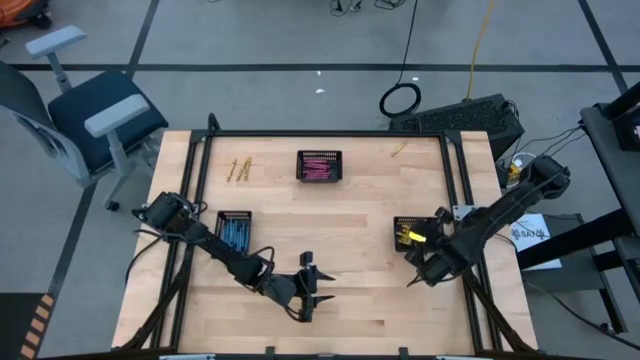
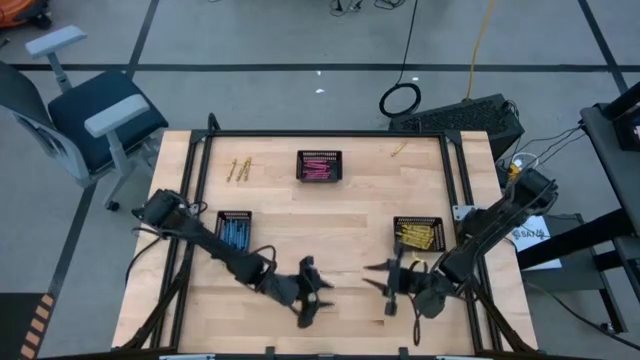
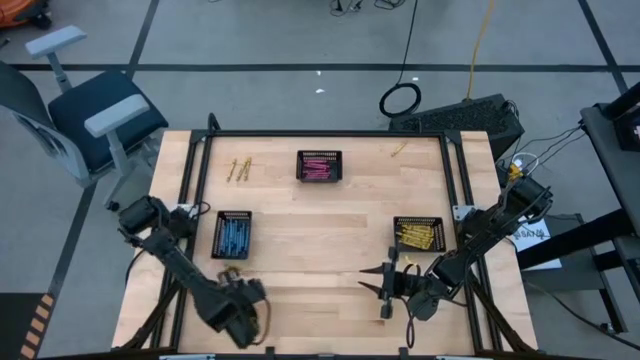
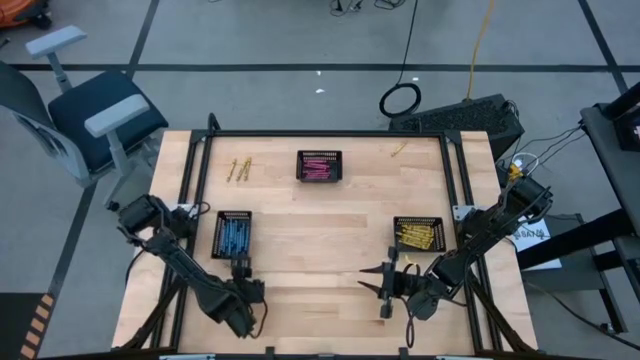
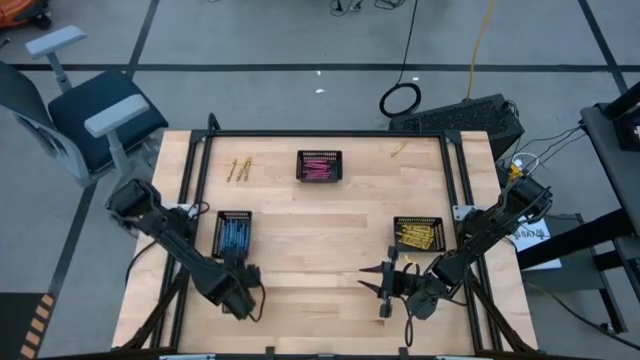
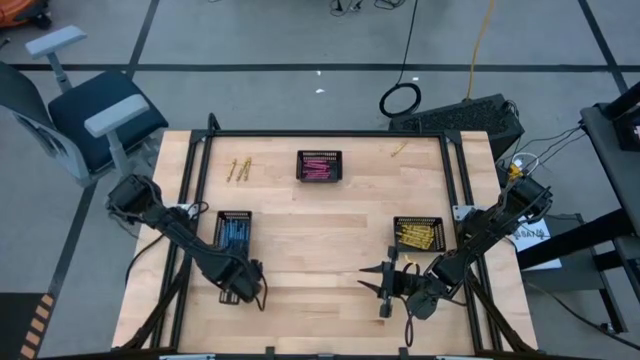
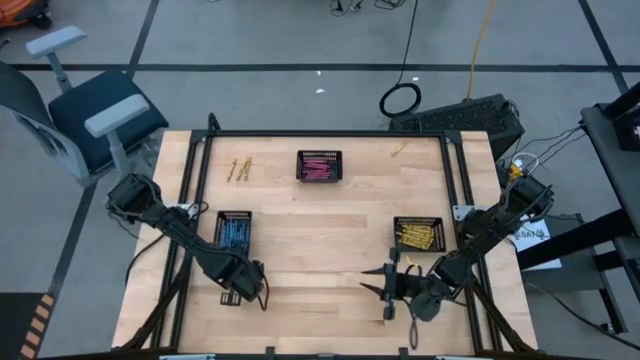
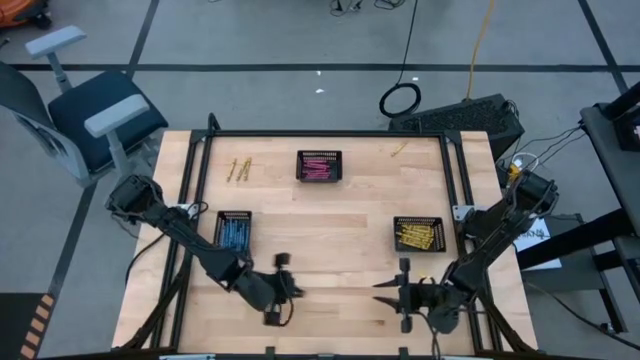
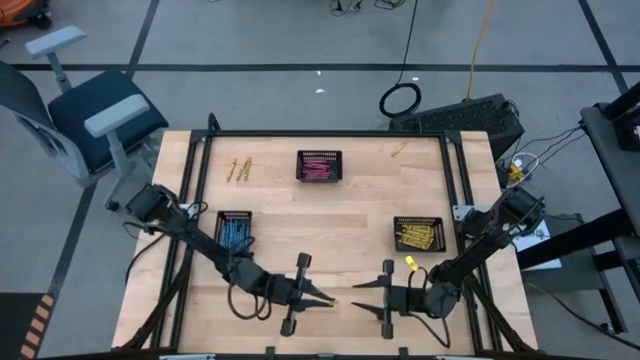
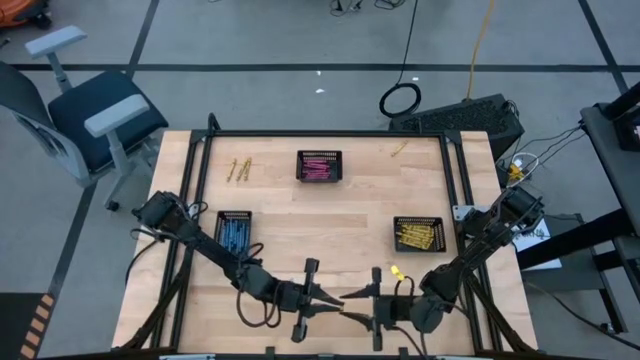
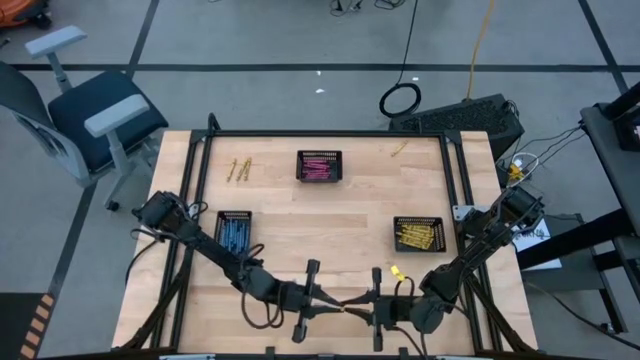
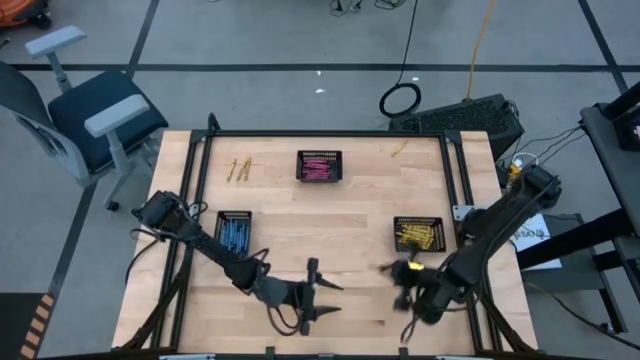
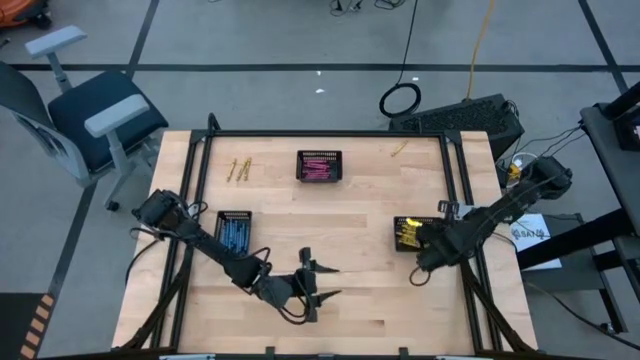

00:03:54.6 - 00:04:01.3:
Task: Sort crayons
Put the yellow crayon into the bottom right black bin

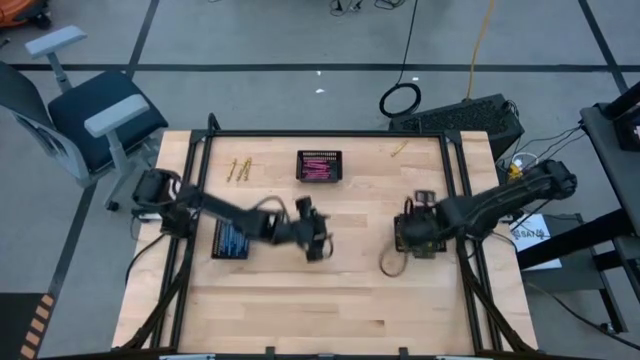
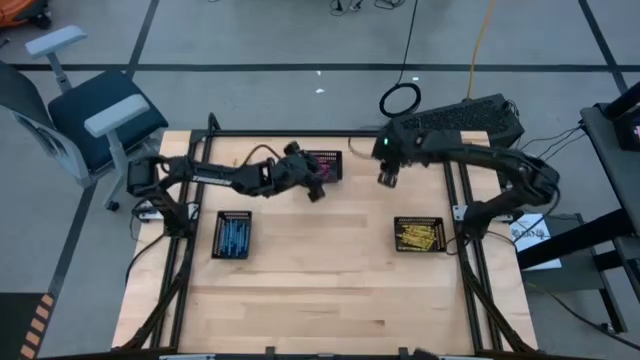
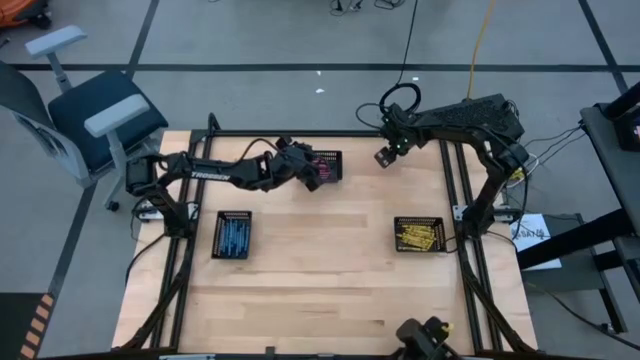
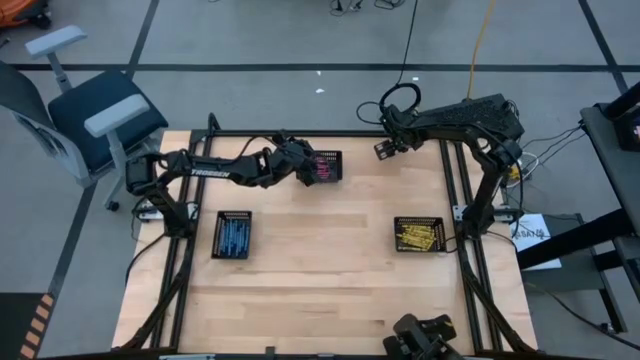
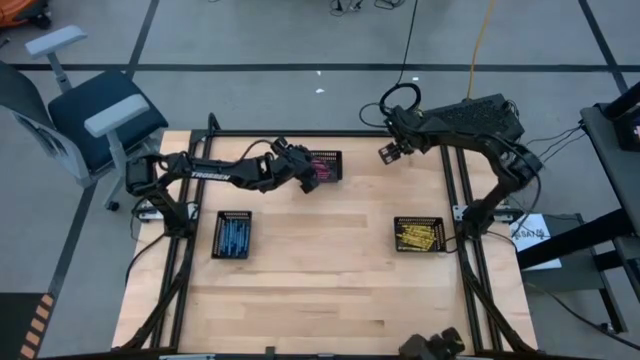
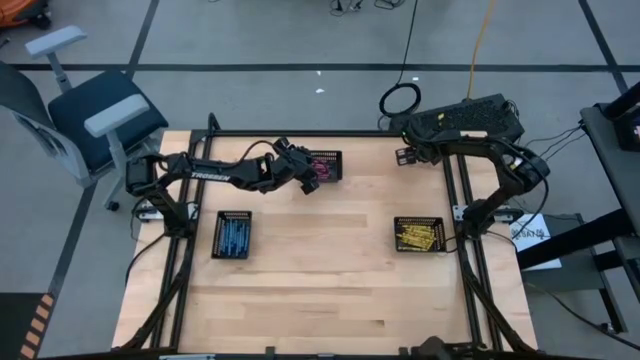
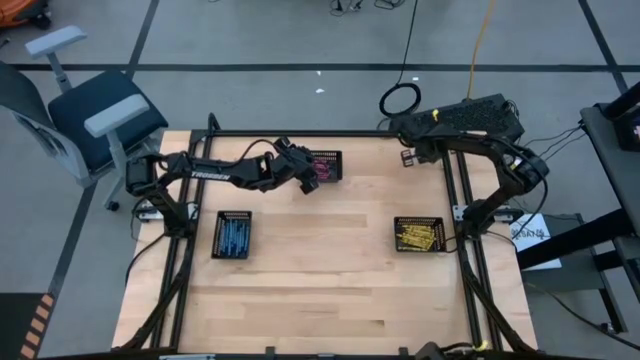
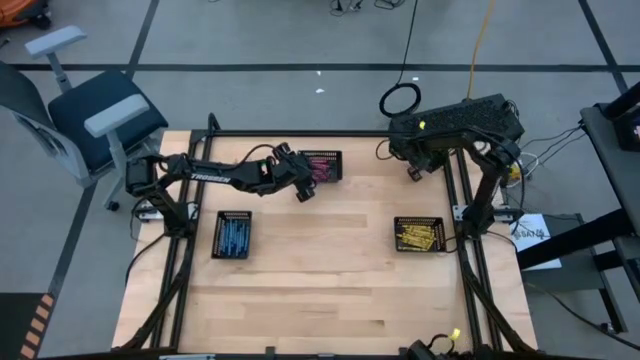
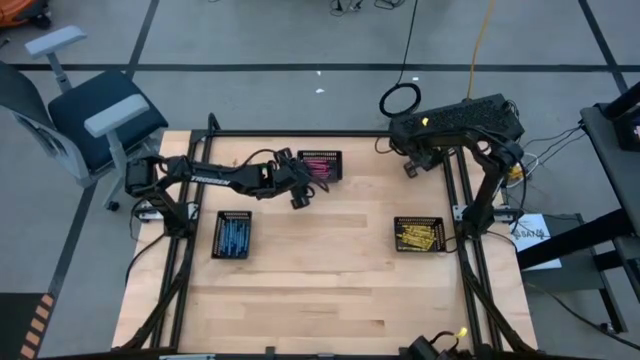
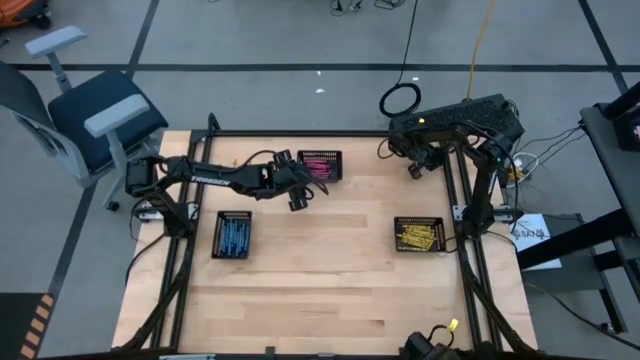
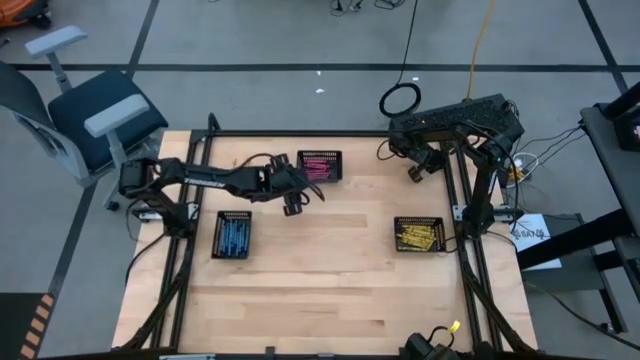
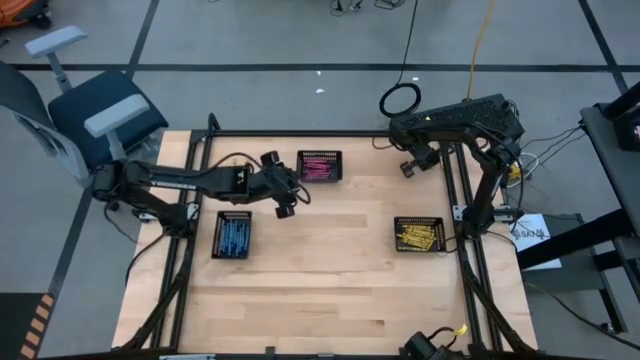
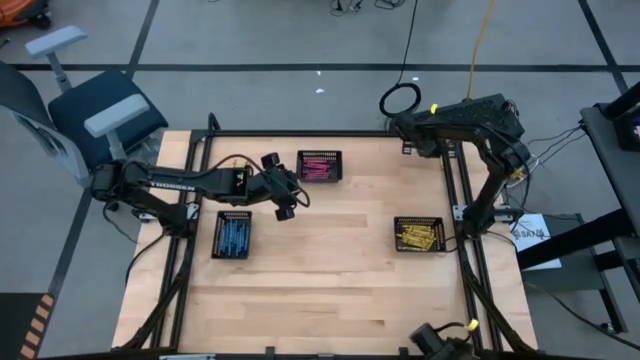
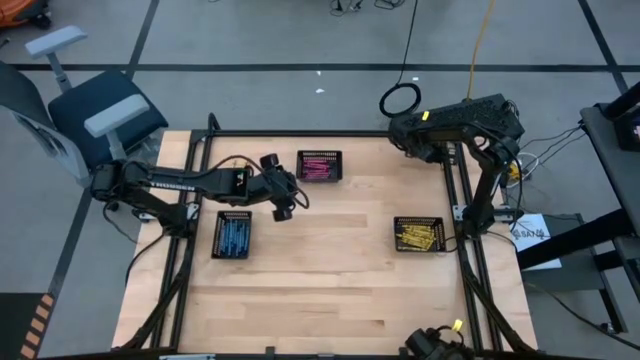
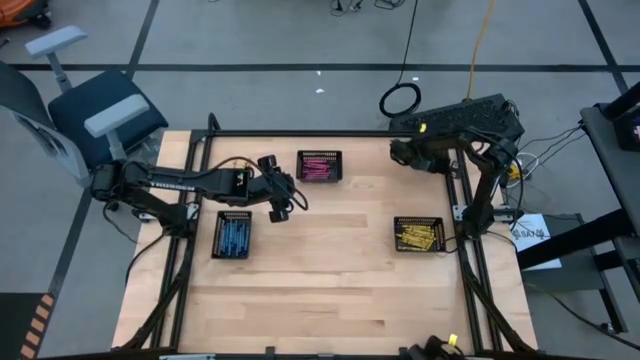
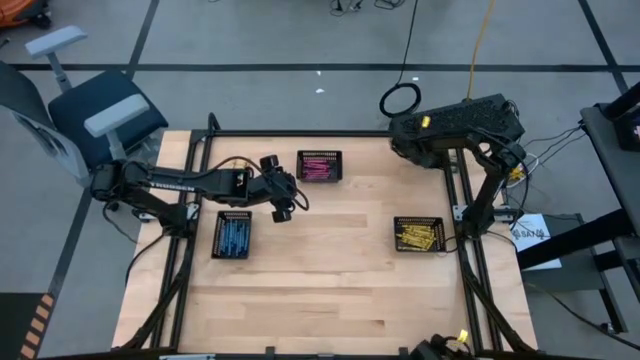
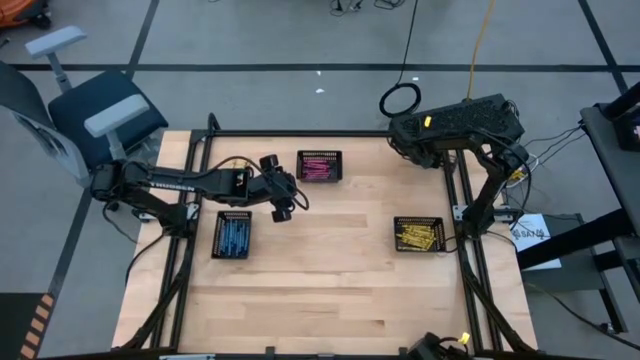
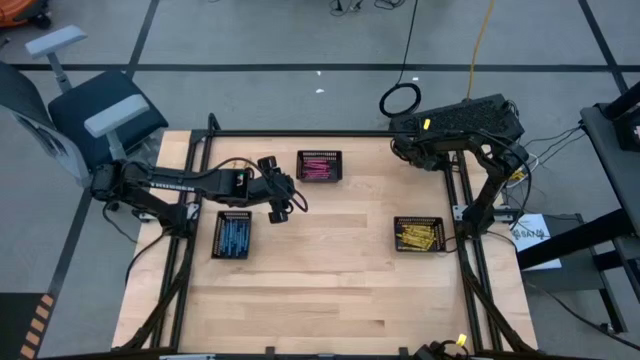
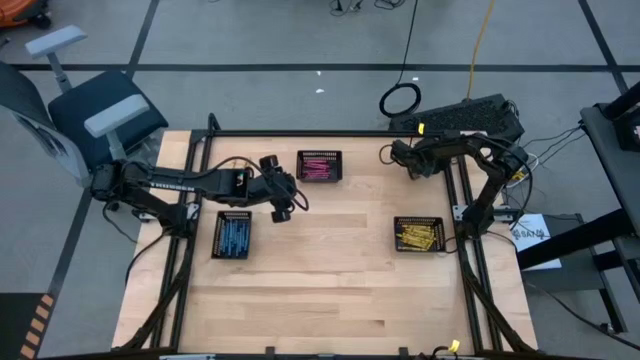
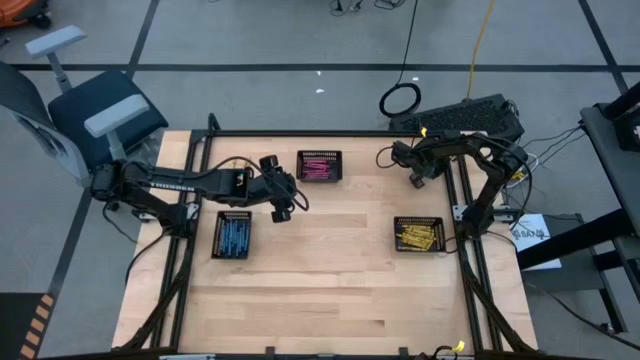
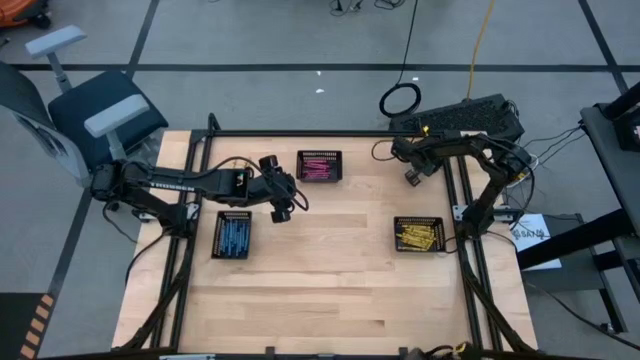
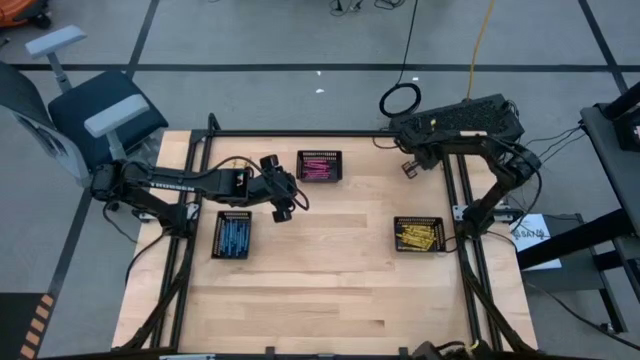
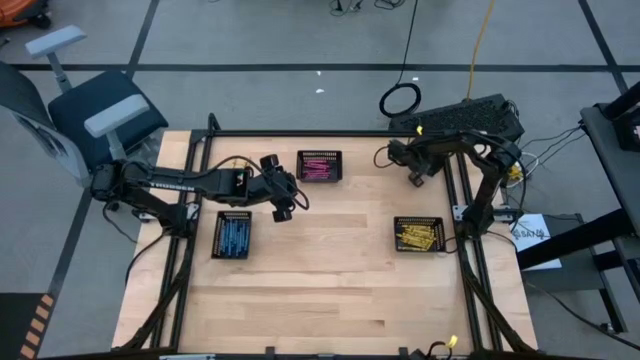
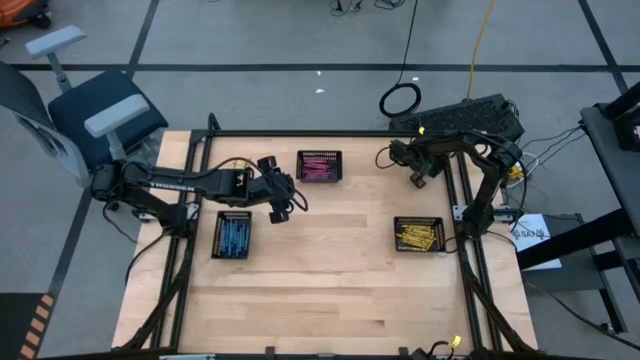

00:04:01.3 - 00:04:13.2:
Put the yellow crayon into the bottom right black bin

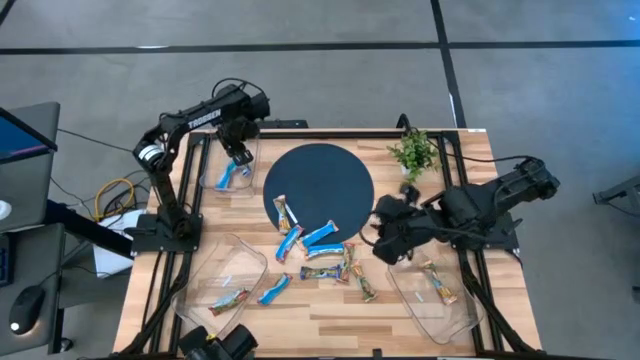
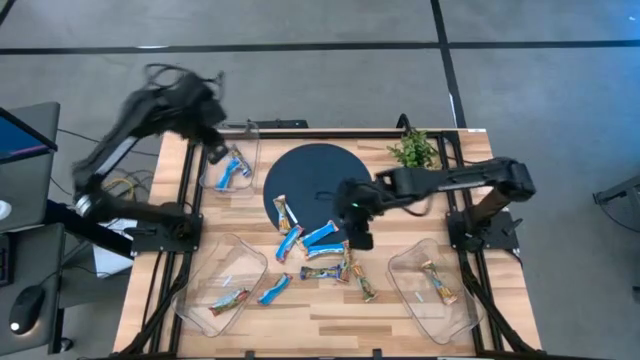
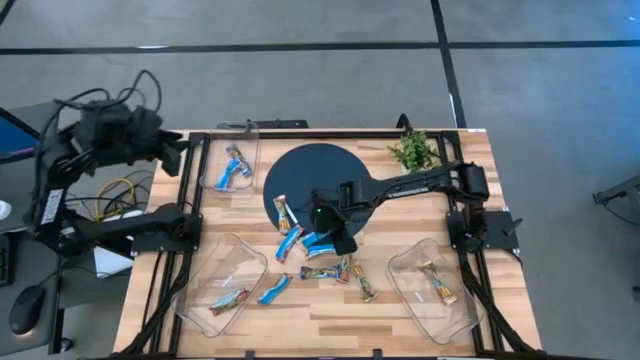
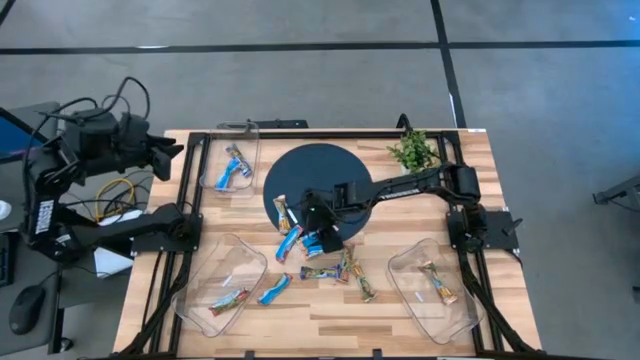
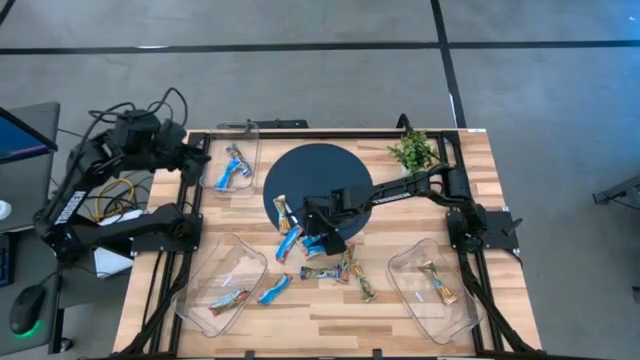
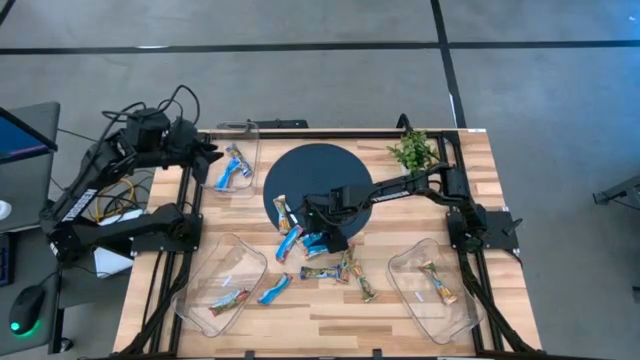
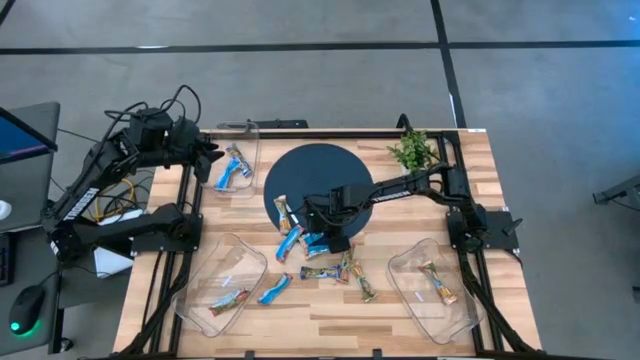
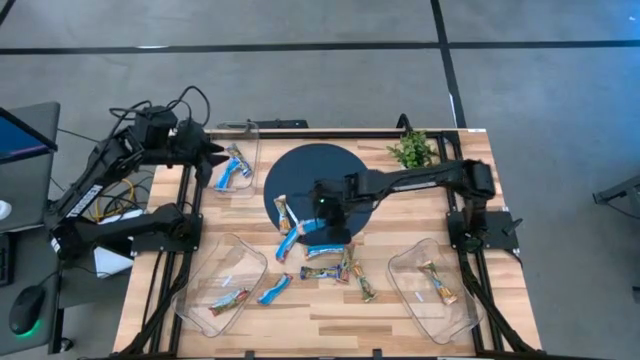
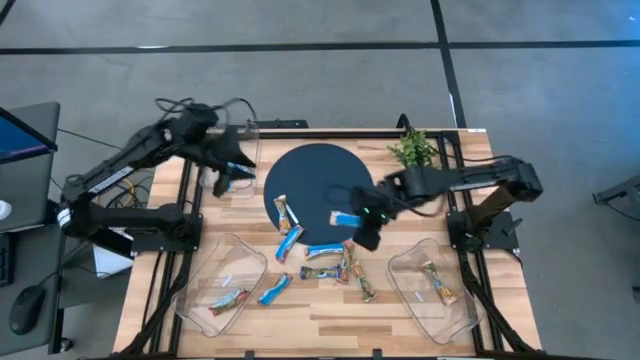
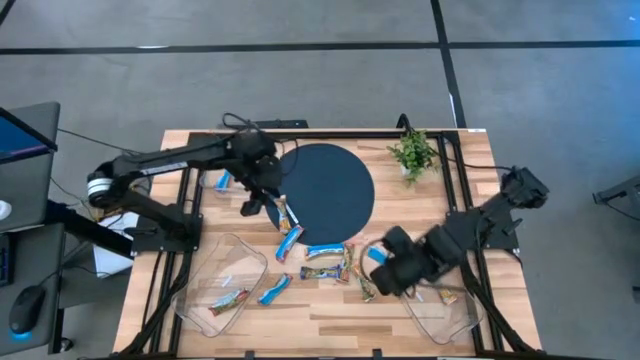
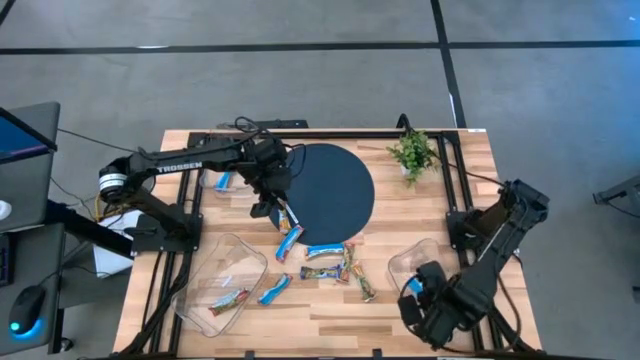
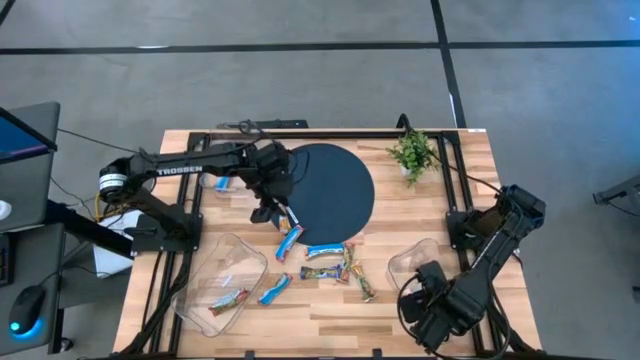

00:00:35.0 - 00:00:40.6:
Task: Pick and place Granola Bars by type
Put the yellow granola bar into the bottom right transparent bin
